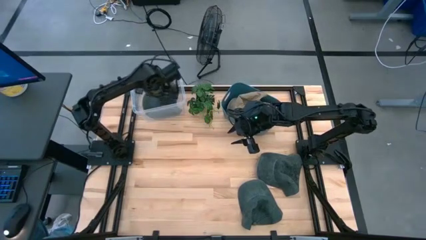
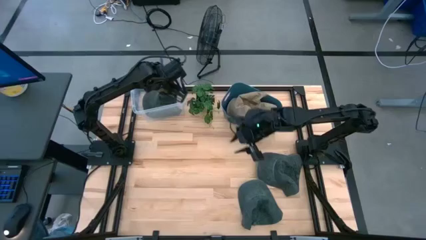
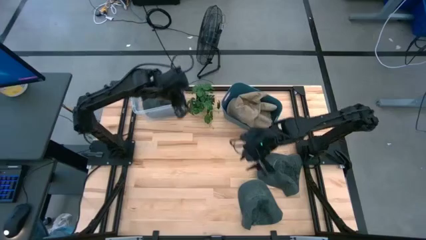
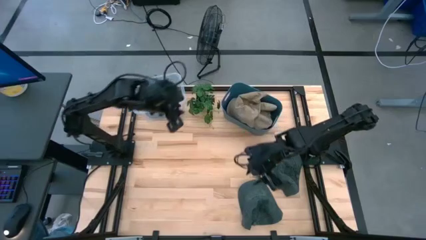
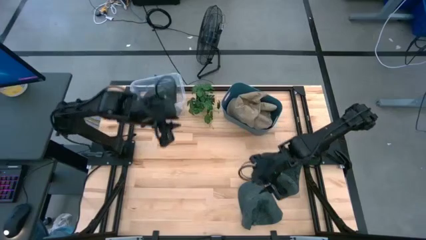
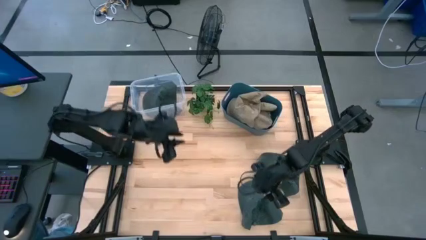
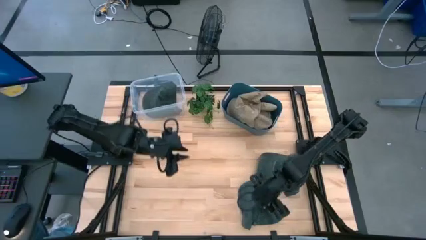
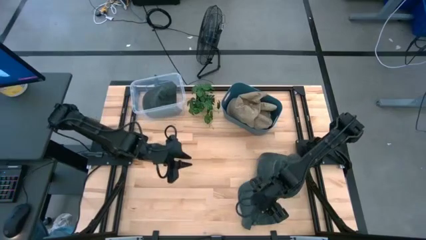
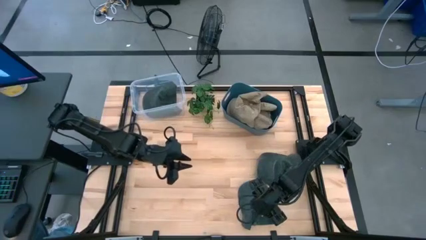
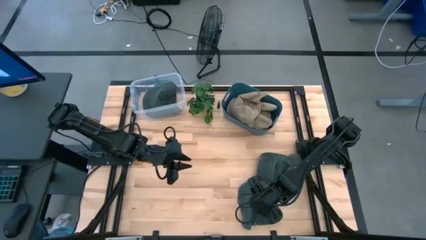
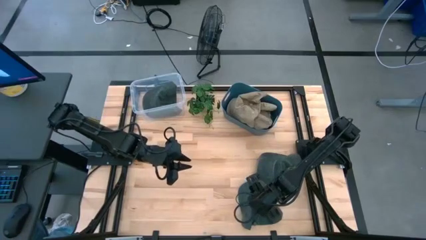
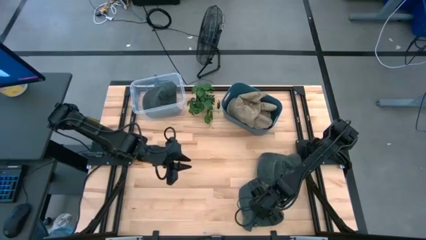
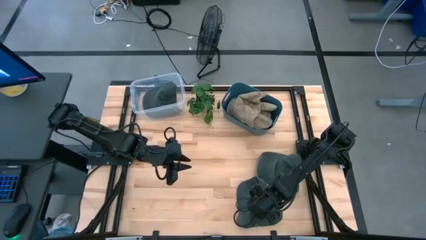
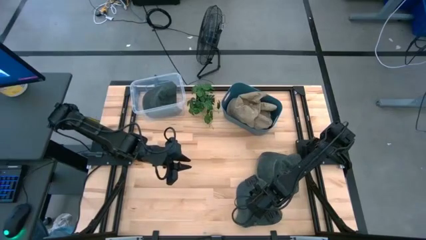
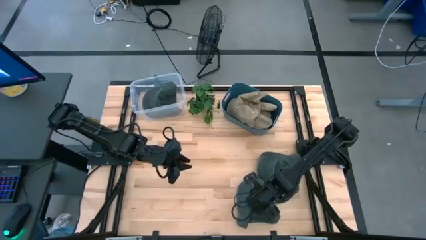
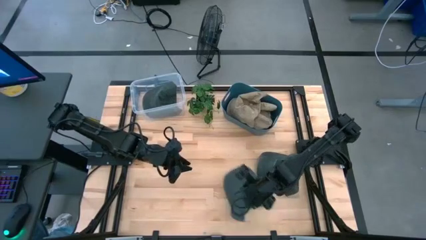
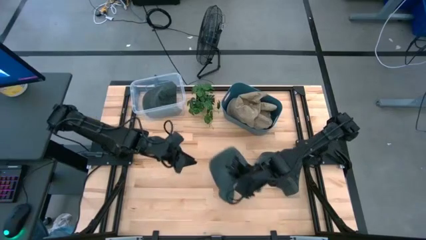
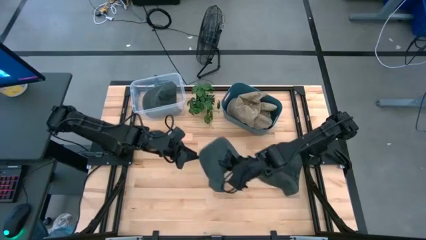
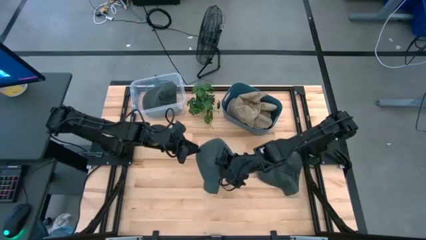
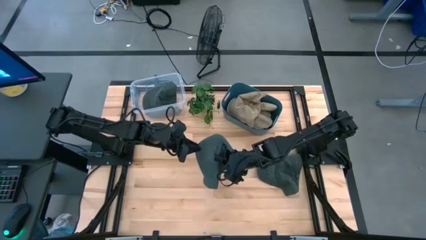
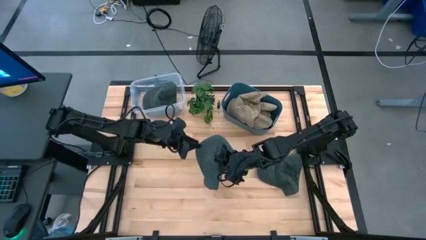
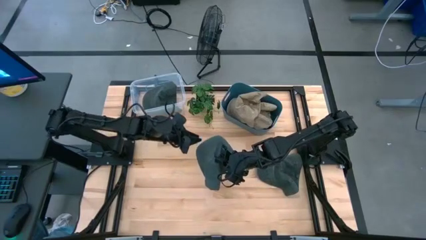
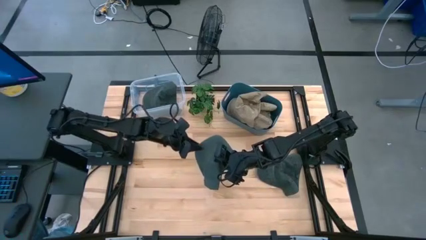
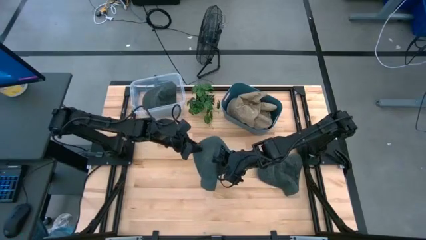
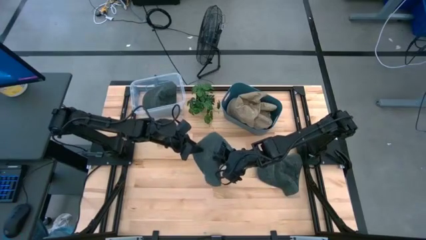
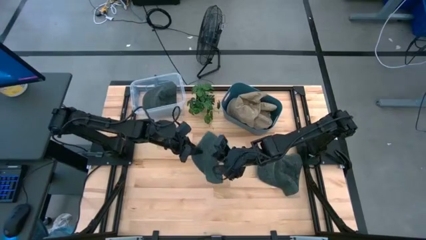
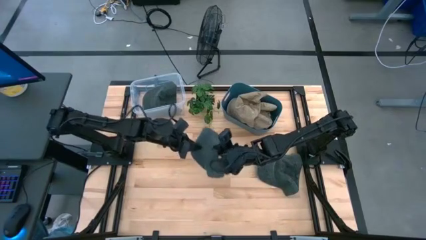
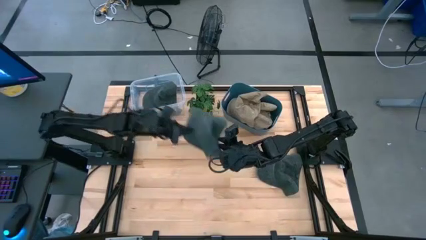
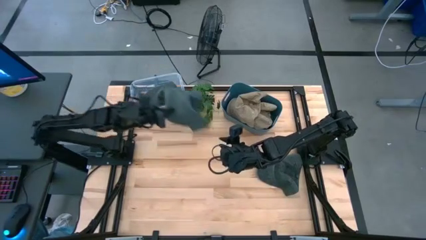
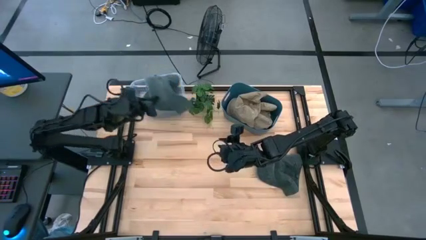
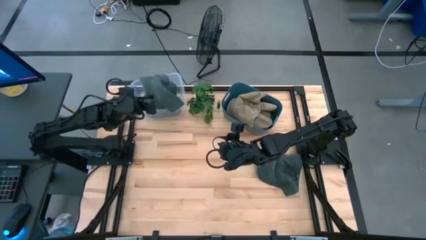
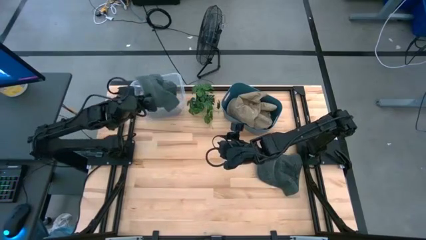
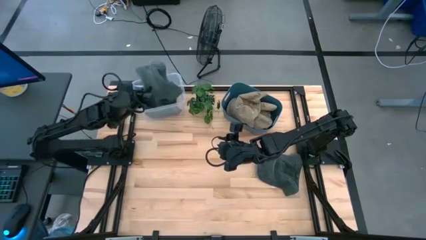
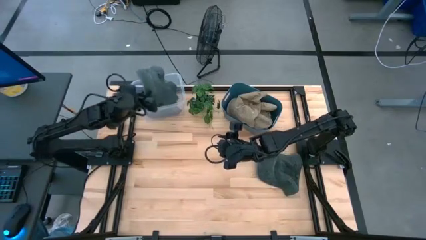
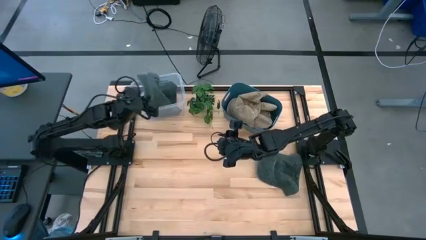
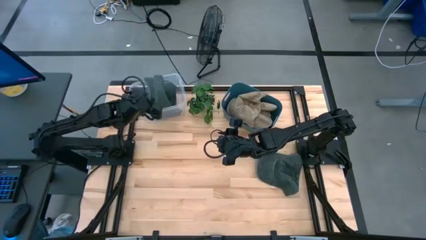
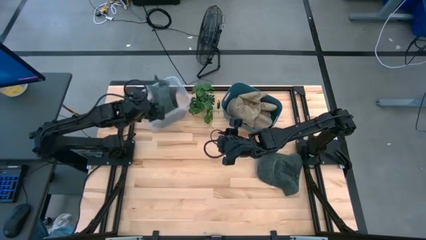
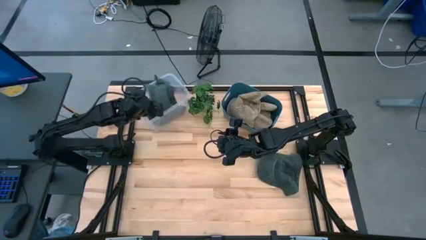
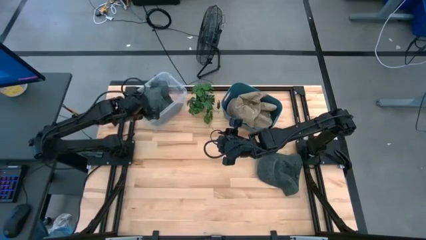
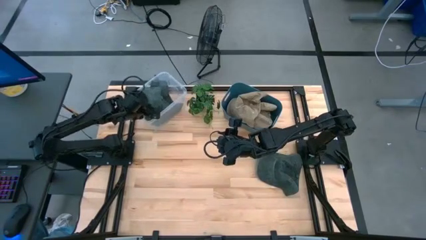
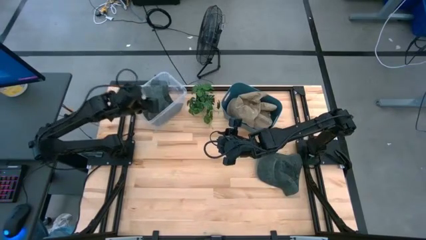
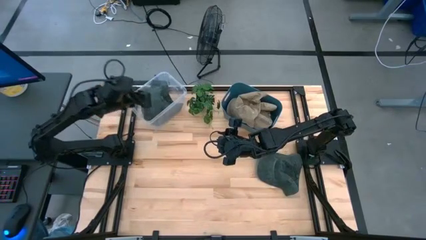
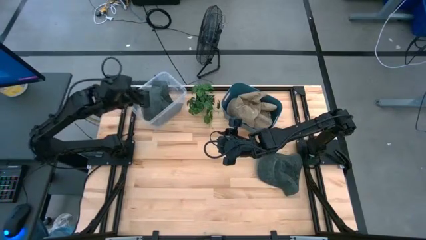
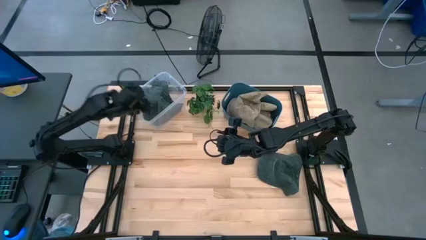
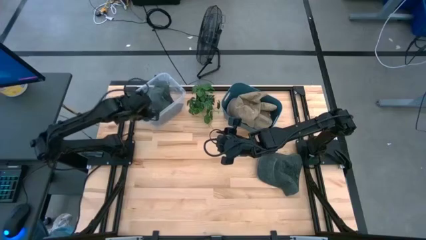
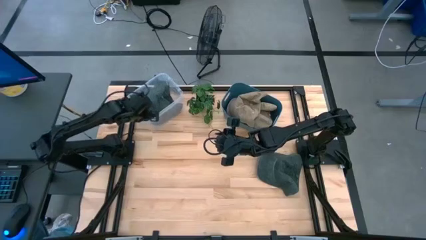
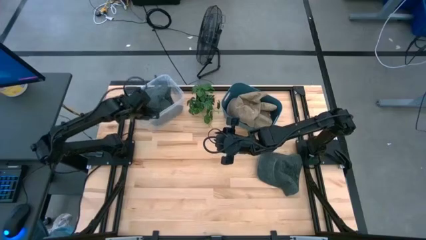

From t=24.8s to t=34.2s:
Task: Pick & Place hat
Put the bottom right gray cap into the transparent bin

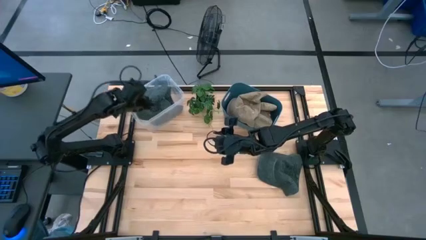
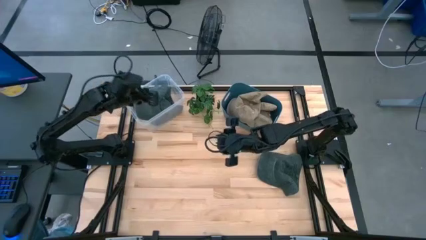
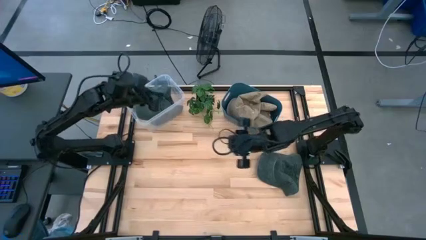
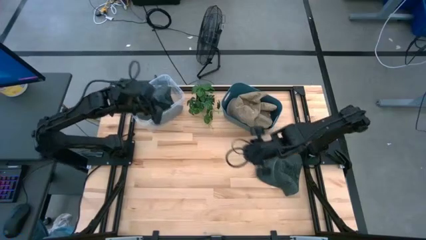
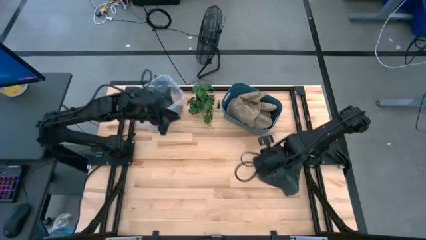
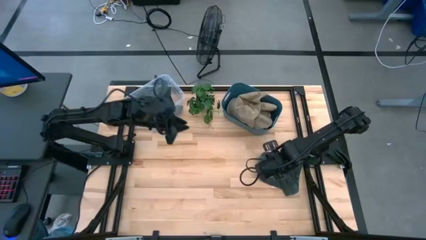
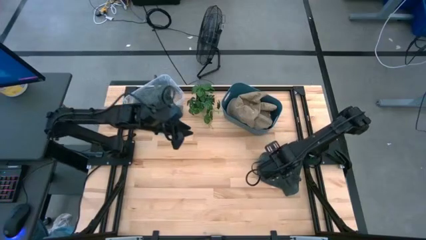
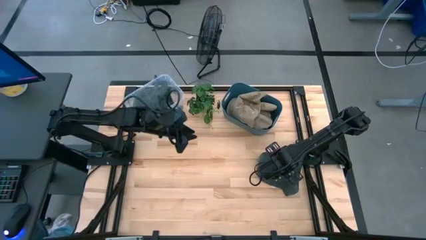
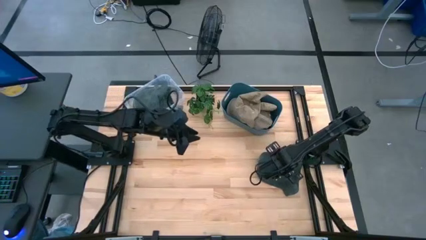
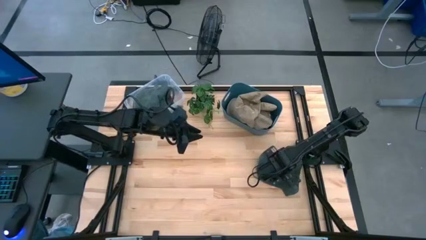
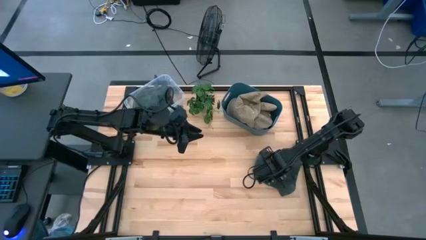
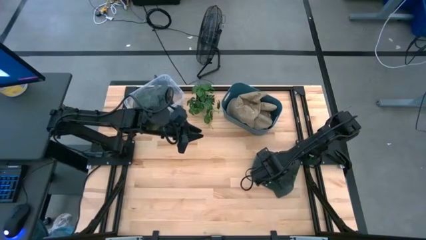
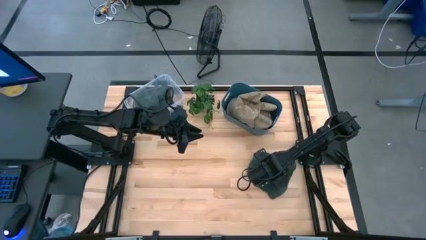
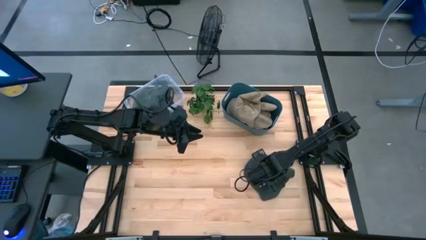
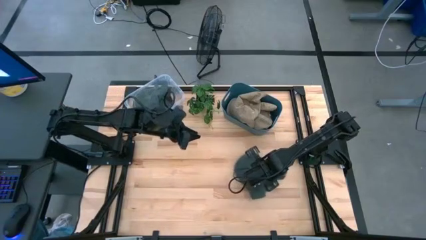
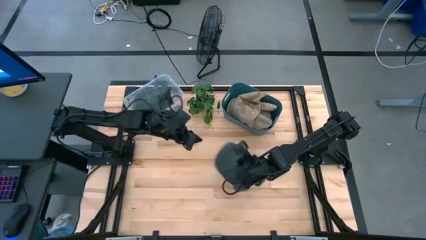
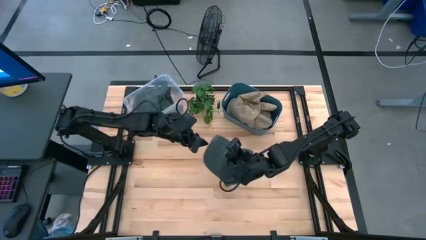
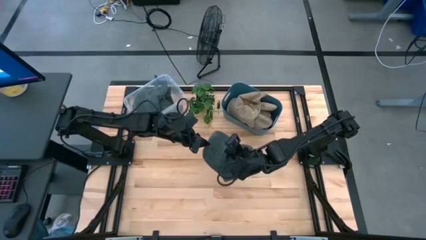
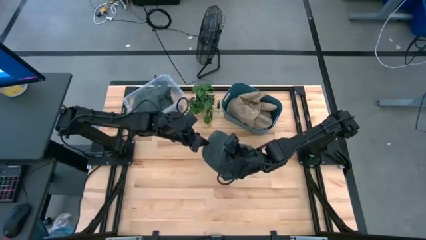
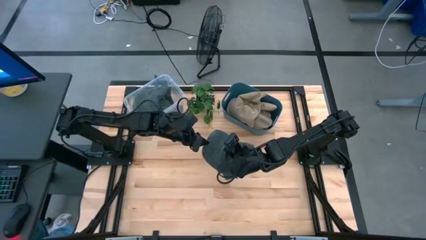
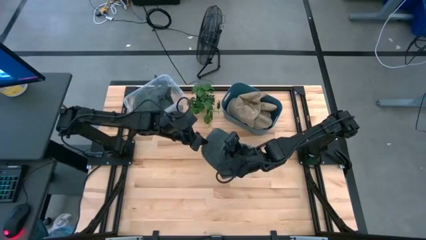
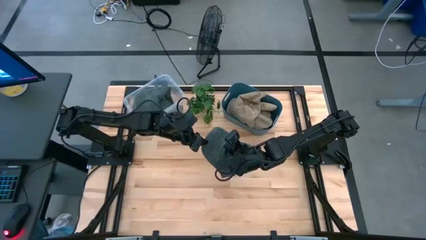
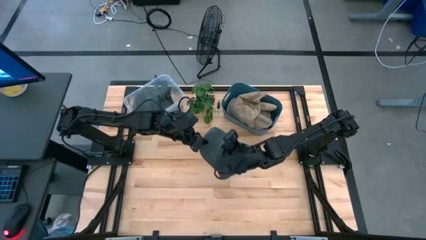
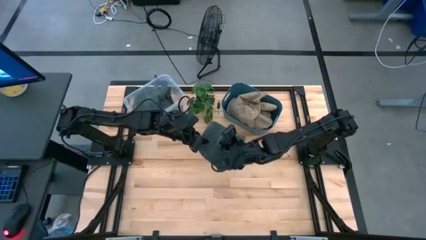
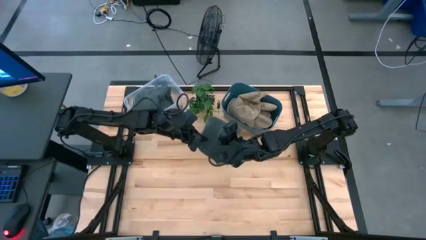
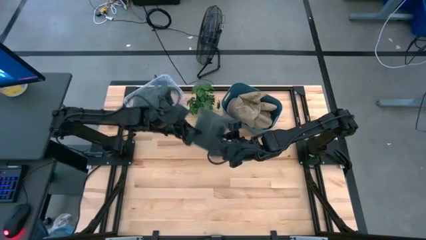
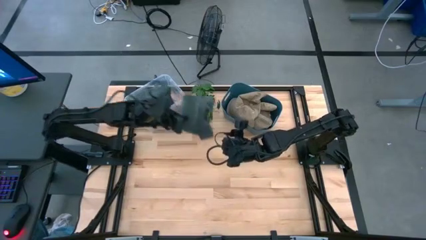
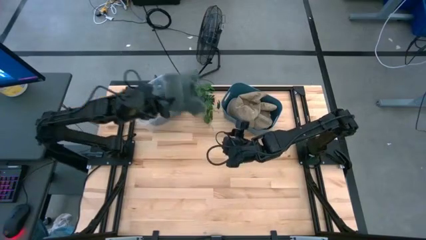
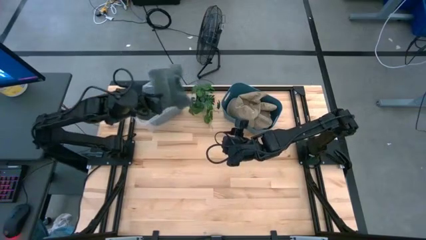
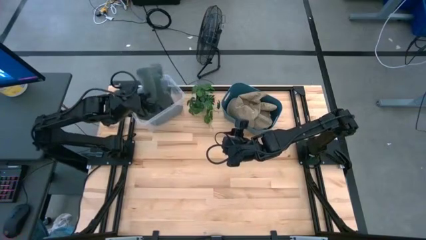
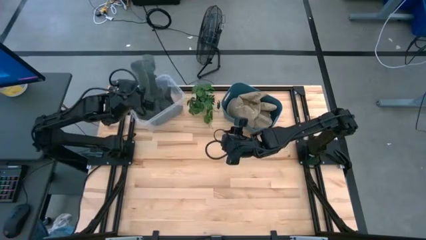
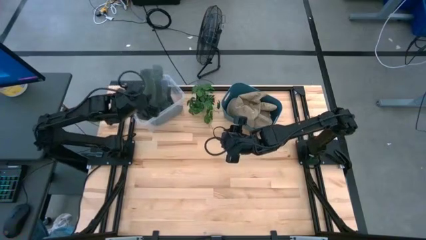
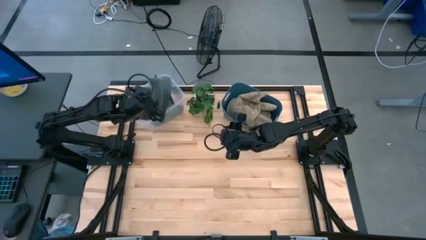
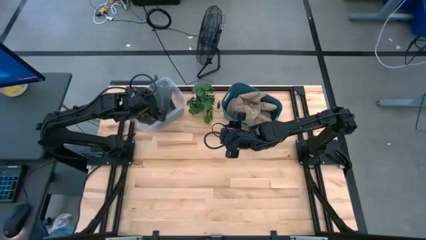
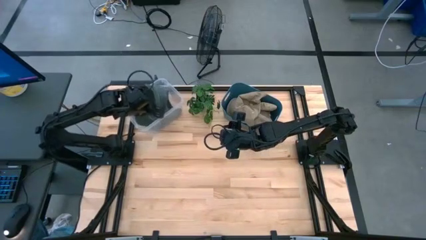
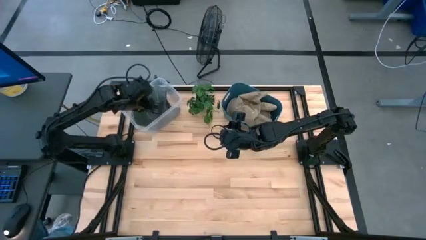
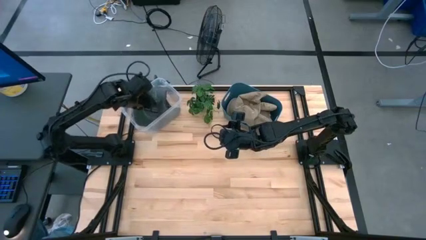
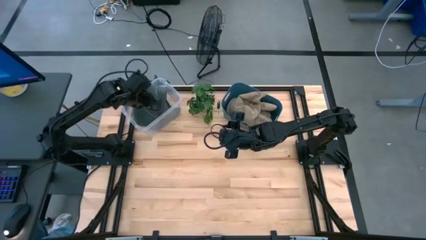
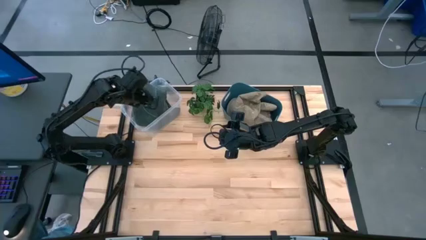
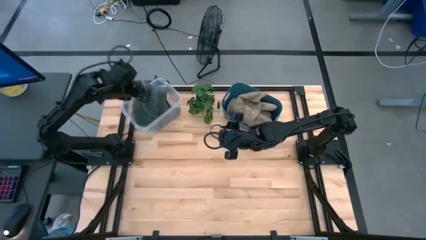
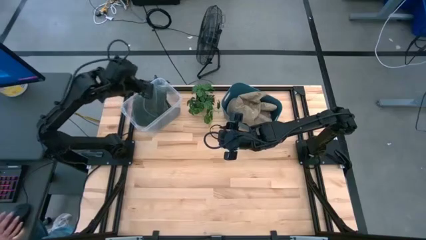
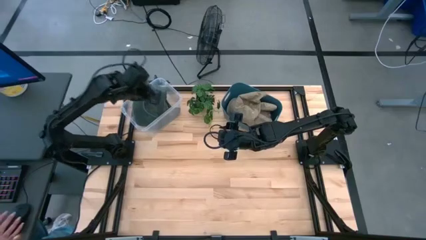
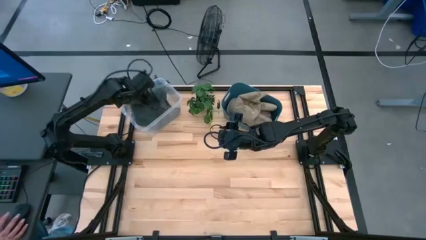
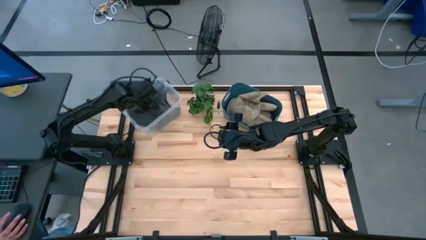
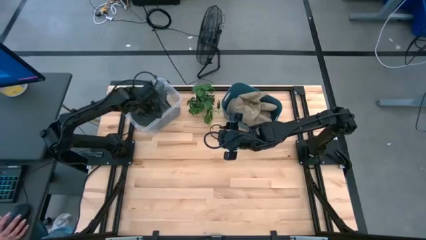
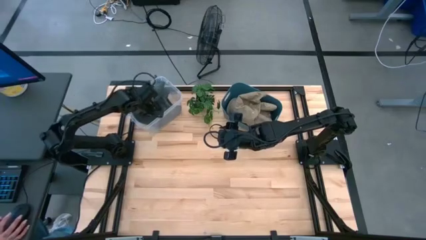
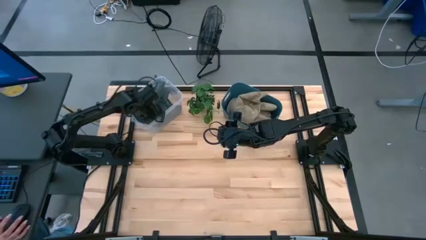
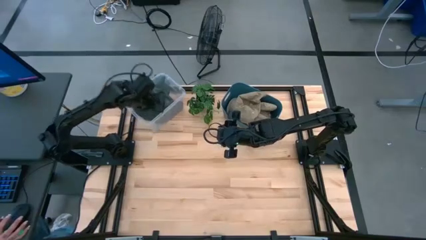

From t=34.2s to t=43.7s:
Put the gray cap into the transparent bin
